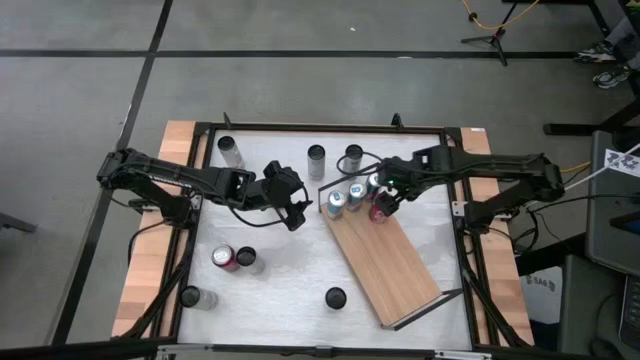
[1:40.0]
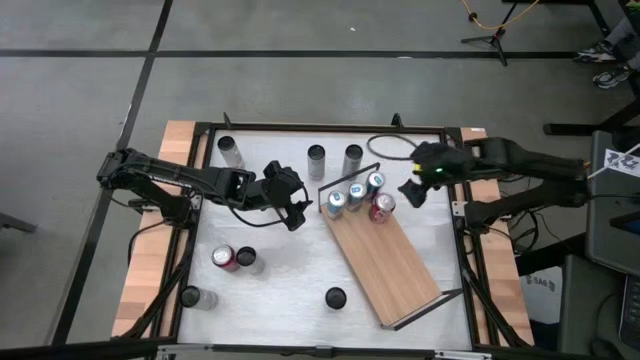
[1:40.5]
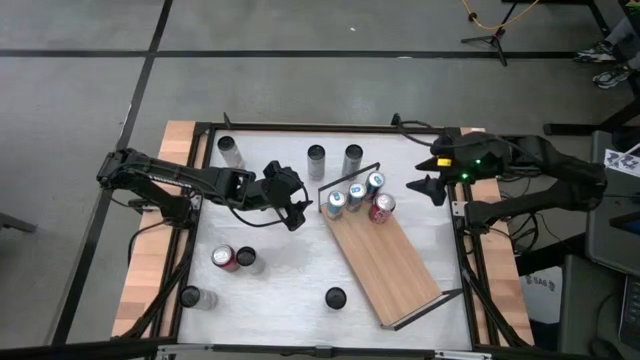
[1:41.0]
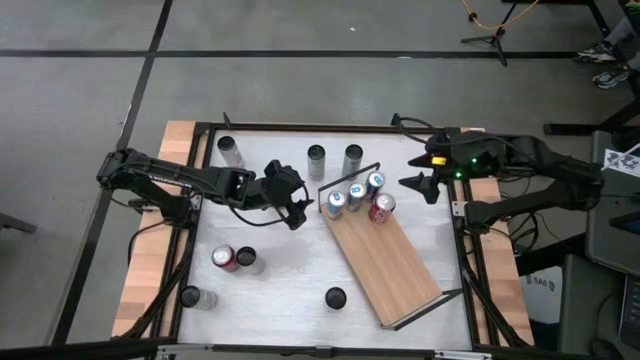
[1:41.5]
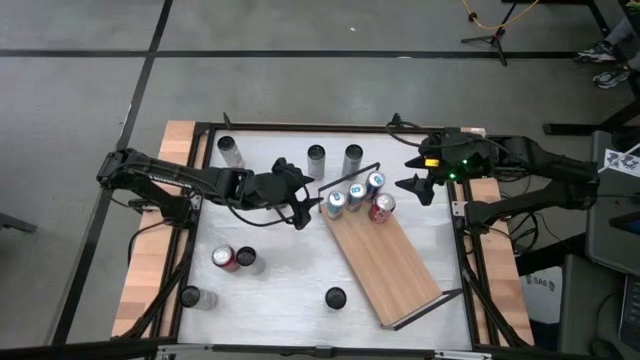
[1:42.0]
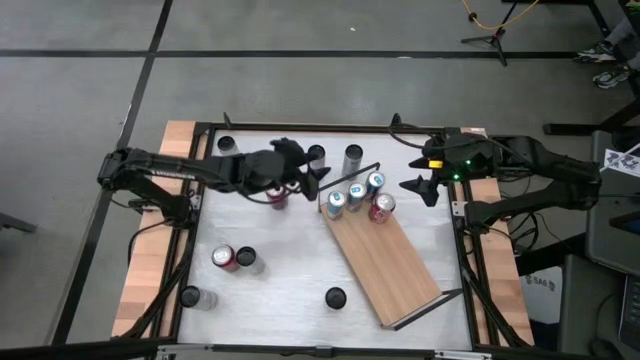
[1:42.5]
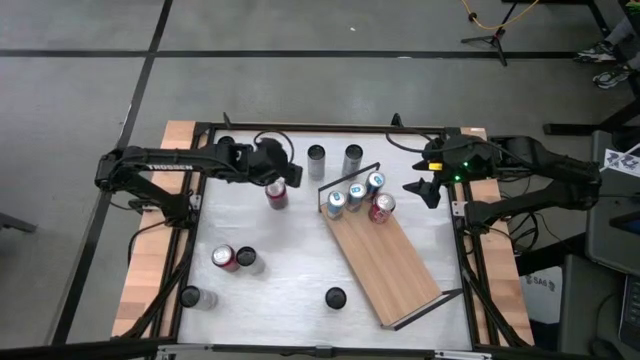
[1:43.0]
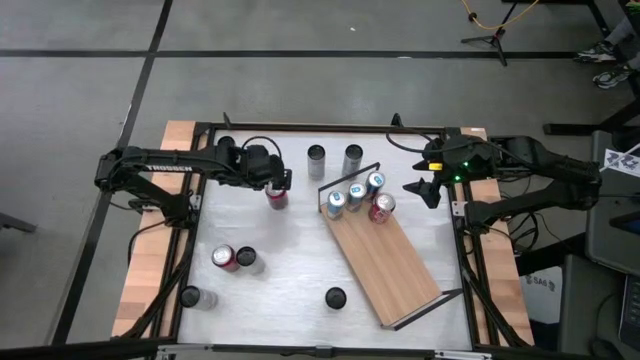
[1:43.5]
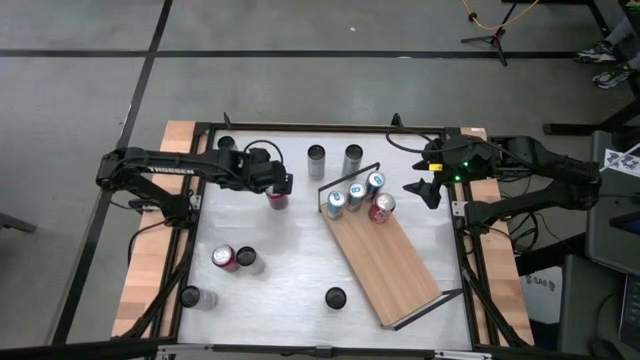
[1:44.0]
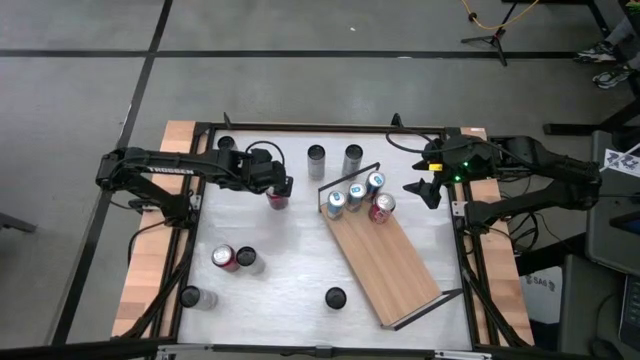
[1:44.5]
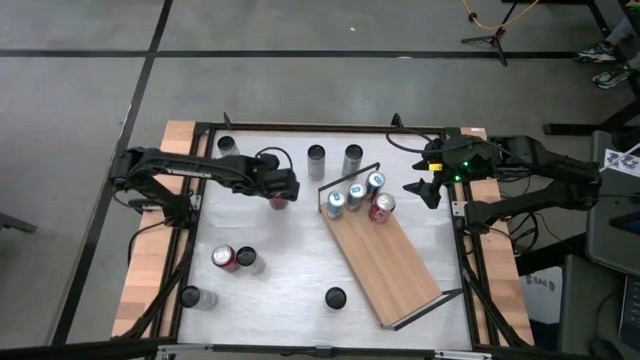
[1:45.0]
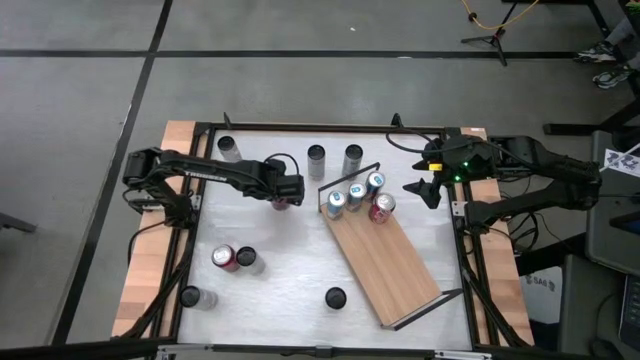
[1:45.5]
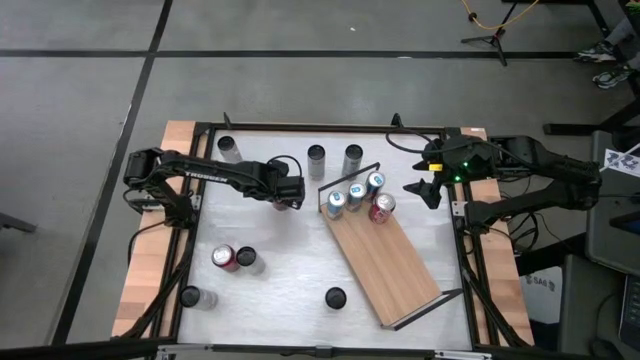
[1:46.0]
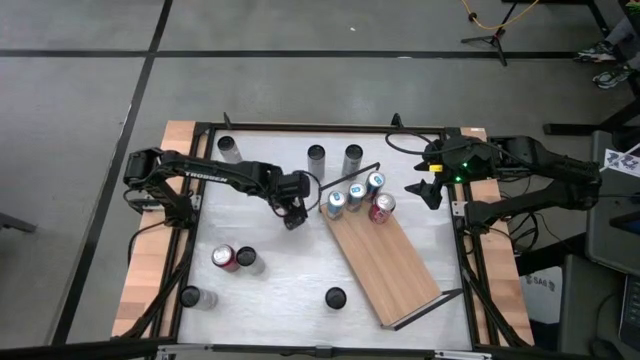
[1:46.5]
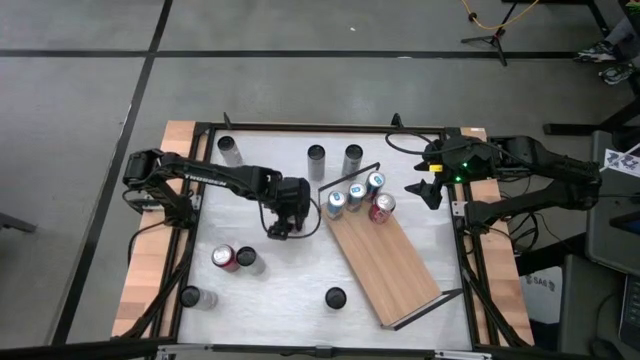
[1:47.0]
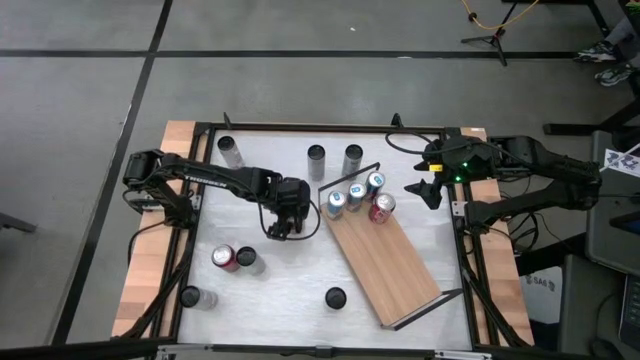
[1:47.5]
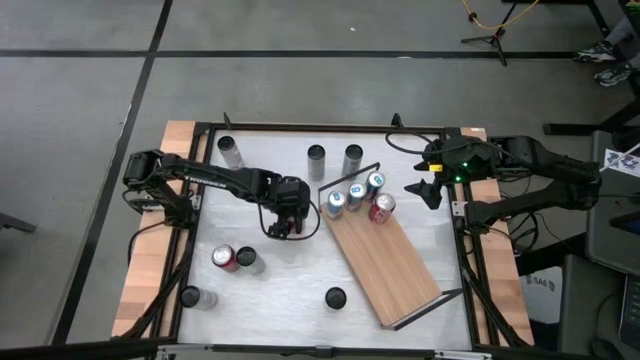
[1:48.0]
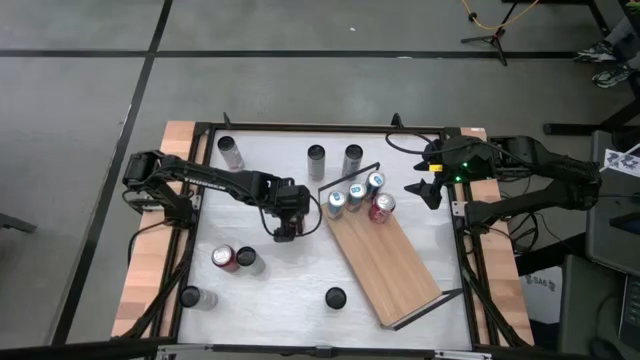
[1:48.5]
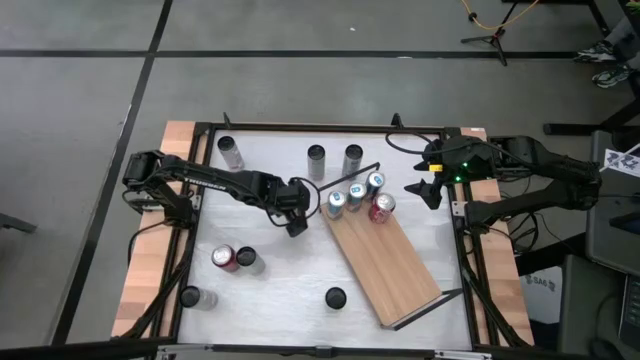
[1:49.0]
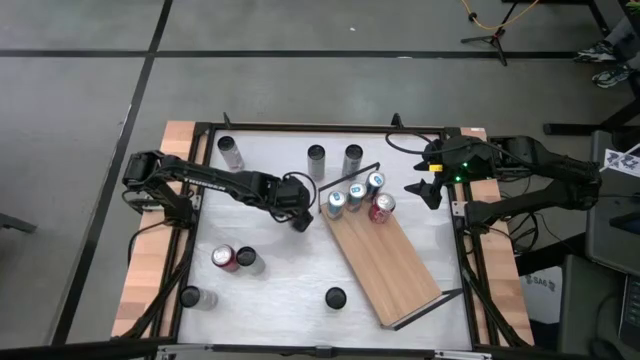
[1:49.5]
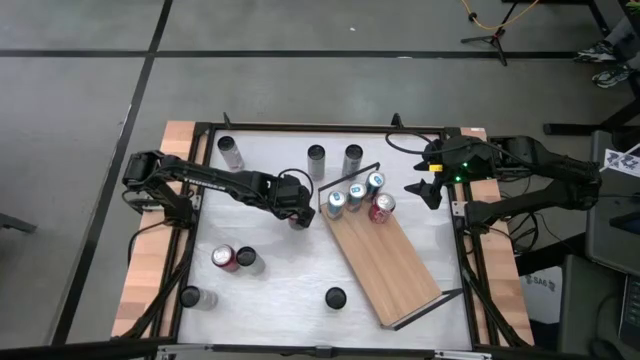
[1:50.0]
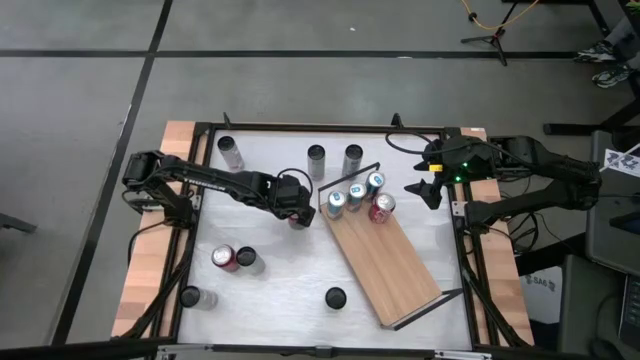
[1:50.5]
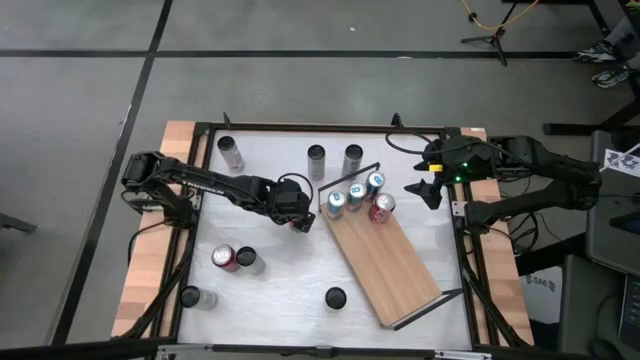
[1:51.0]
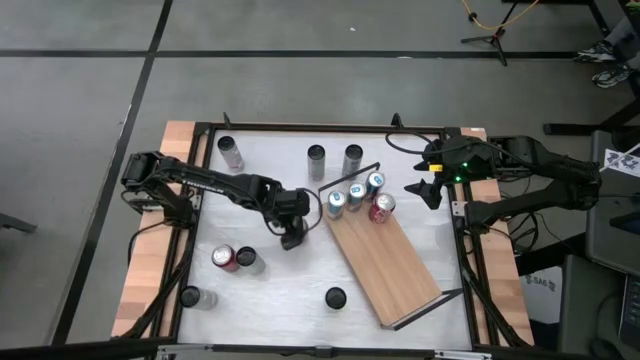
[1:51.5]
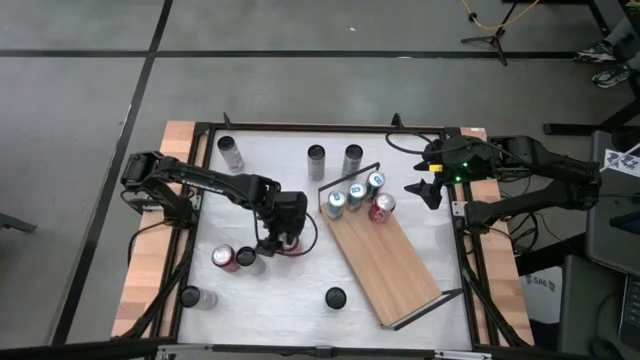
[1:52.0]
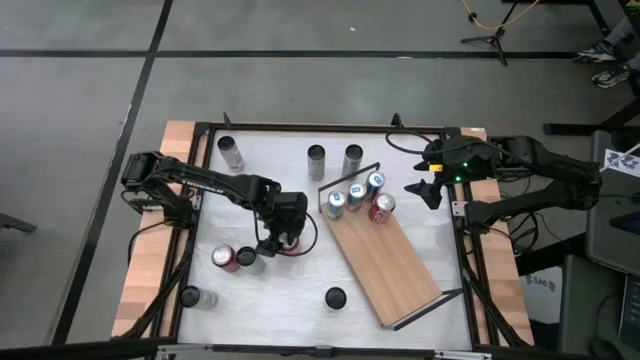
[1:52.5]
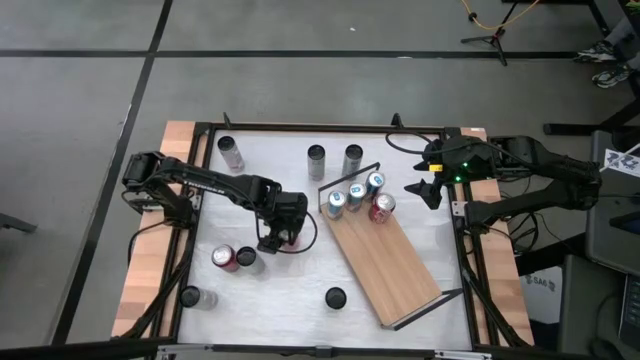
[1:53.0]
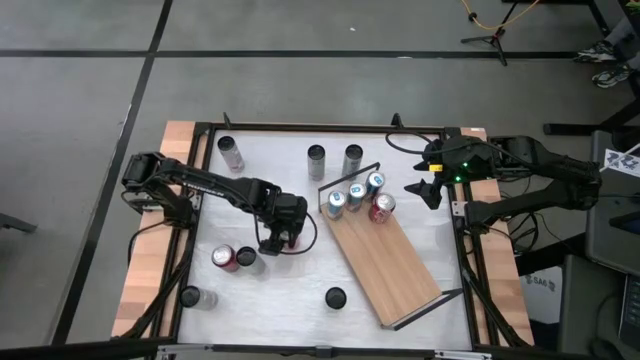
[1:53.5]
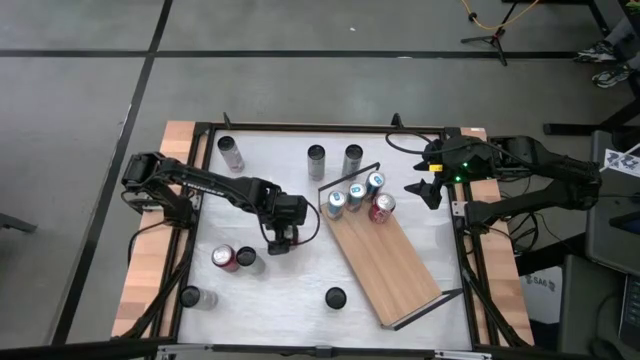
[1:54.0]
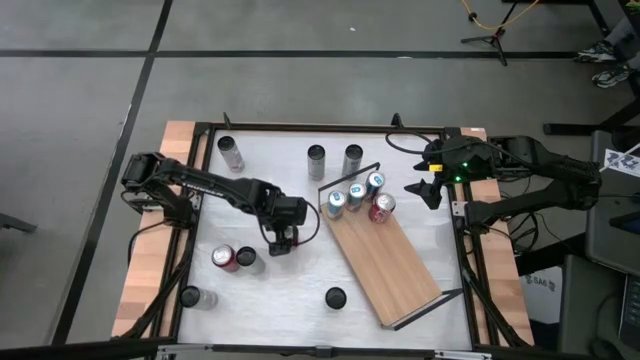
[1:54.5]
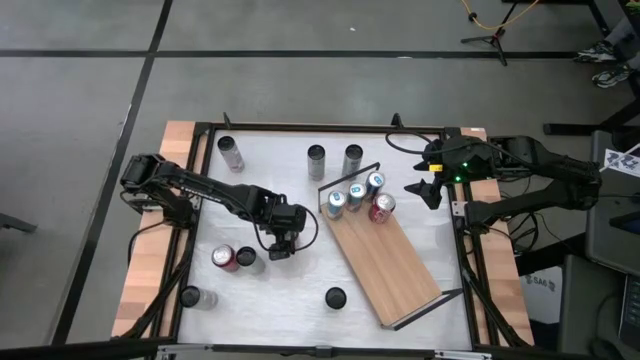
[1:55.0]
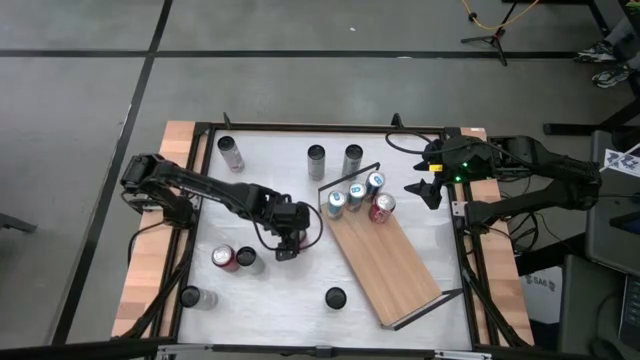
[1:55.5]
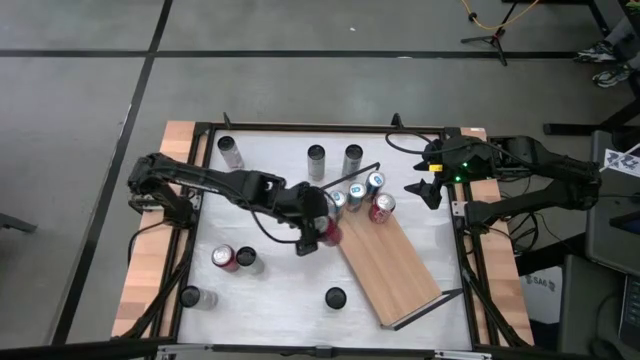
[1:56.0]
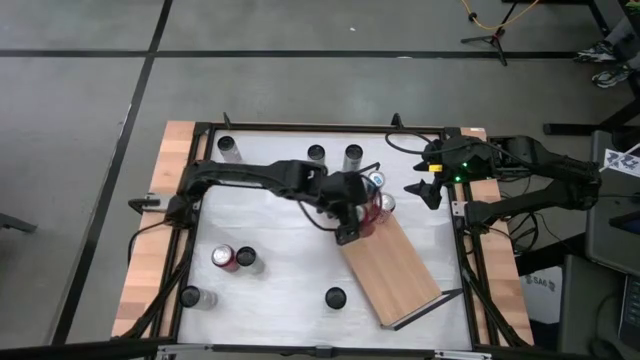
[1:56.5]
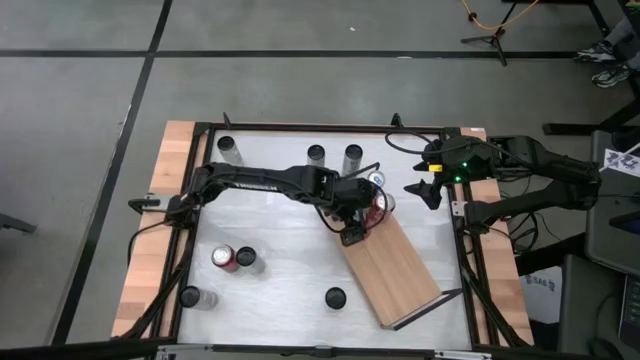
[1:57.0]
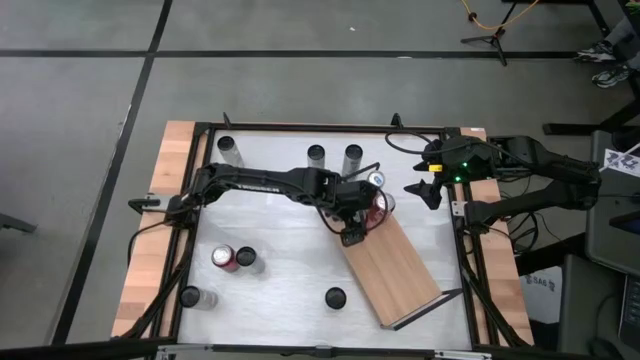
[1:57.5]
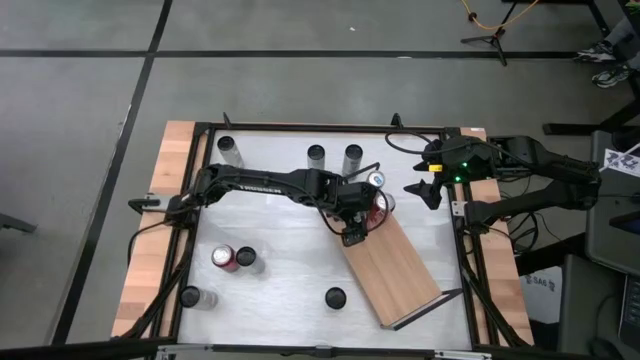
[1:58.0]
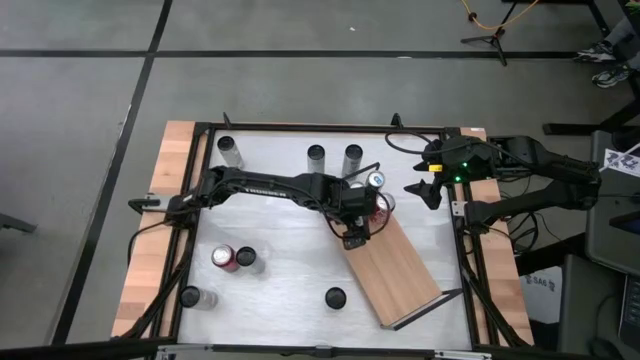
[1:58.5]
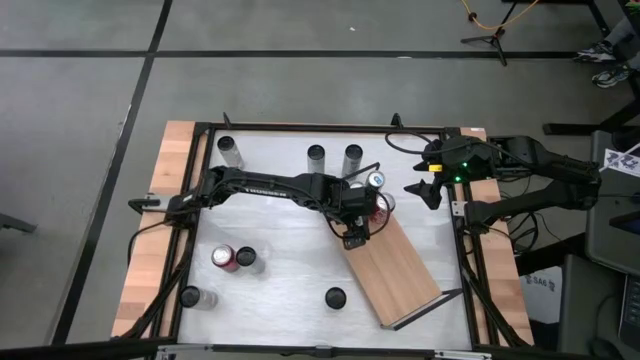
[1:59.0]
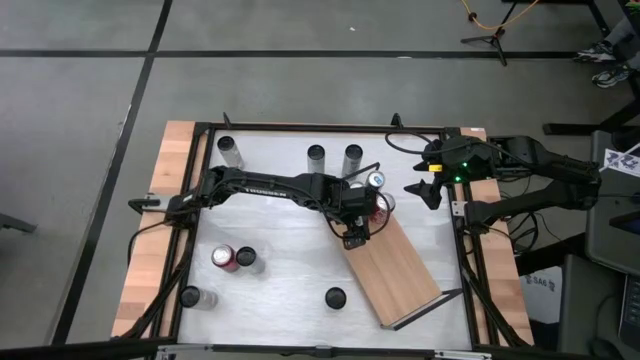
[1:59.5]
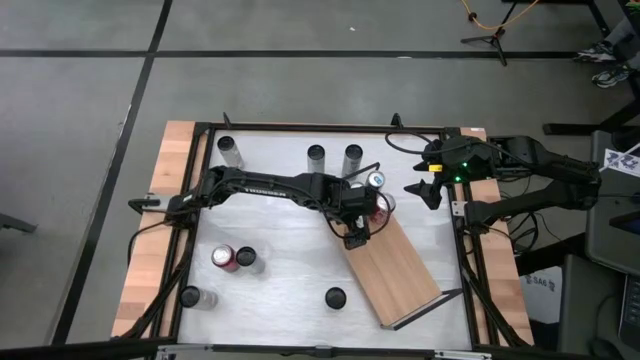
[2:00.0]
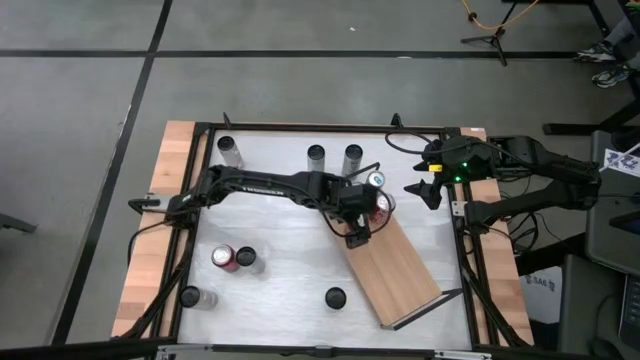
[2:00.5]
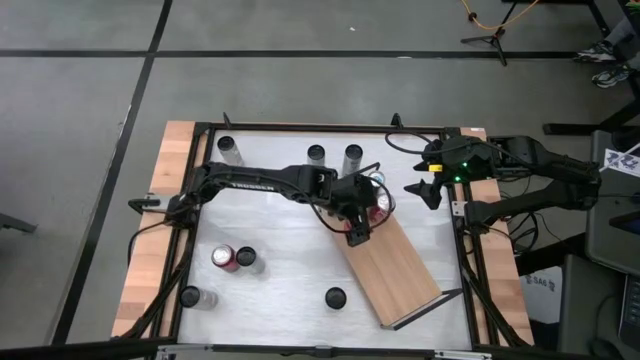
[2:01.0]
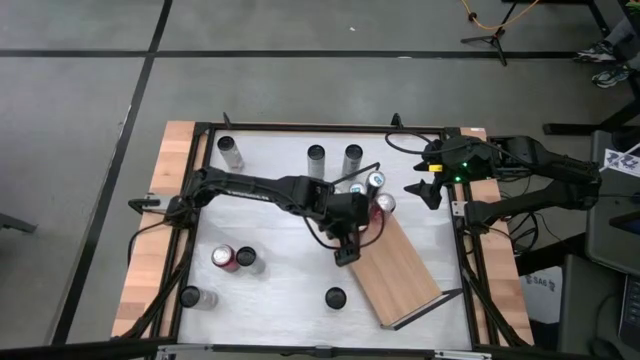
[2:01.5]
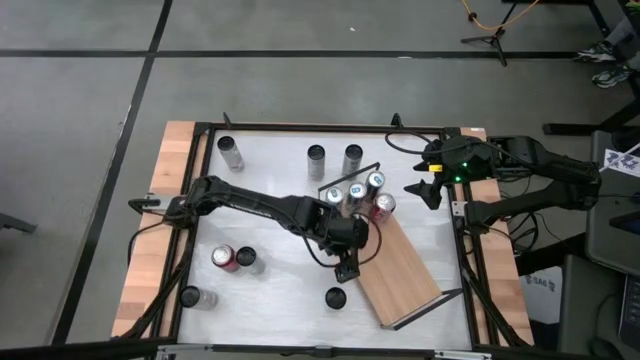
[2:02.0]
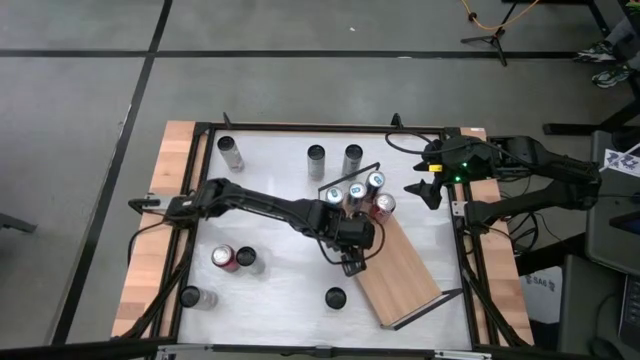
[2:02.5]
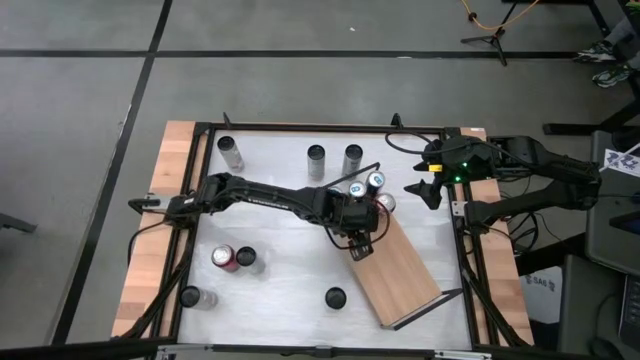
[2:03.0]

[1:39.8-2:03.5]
Task: Place canned beverage on shelf
Put the red soda can on the shelf aligned with the other red soda can
